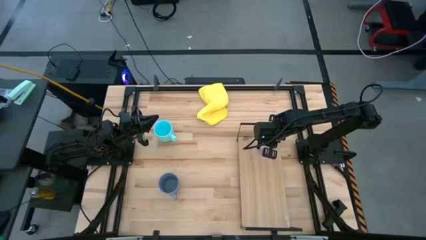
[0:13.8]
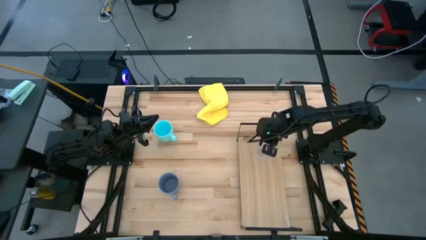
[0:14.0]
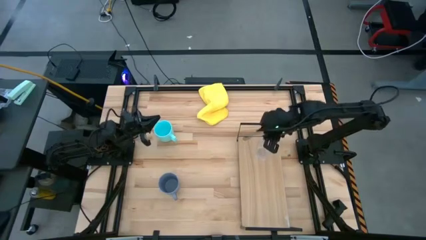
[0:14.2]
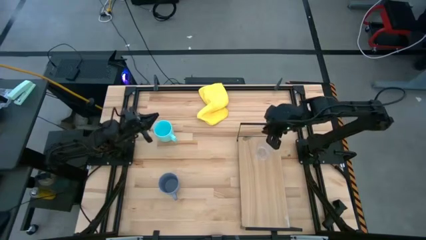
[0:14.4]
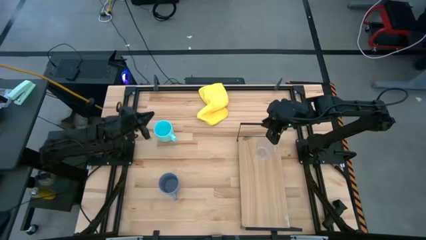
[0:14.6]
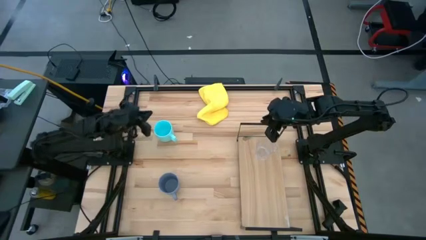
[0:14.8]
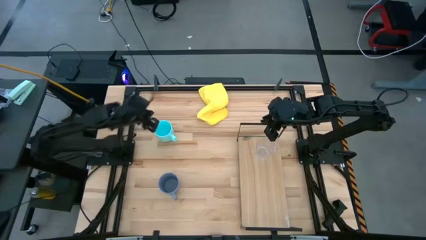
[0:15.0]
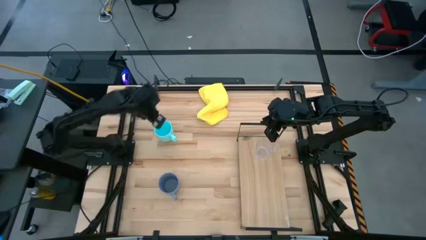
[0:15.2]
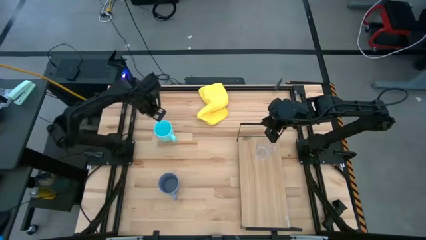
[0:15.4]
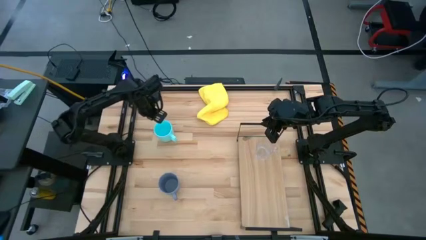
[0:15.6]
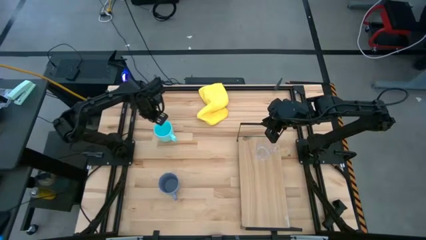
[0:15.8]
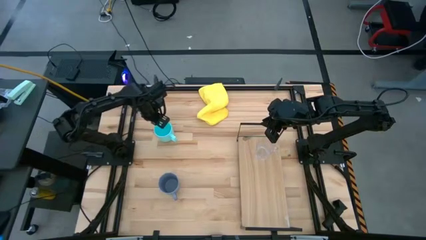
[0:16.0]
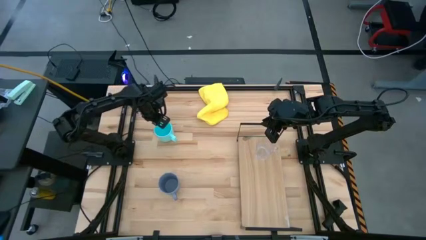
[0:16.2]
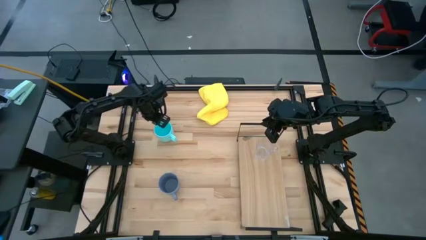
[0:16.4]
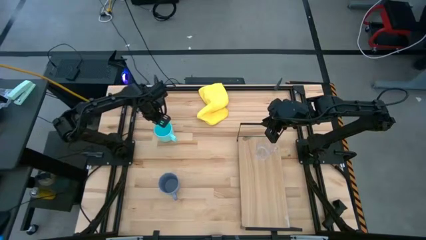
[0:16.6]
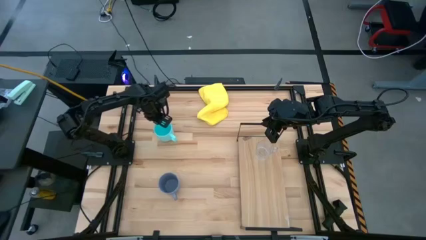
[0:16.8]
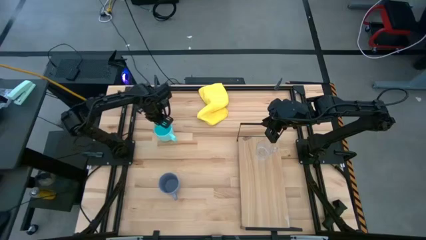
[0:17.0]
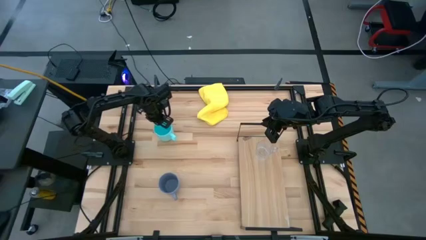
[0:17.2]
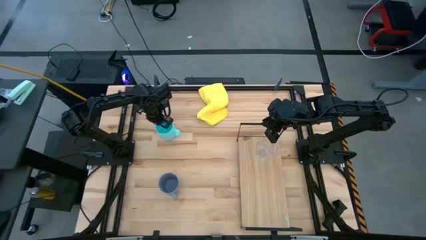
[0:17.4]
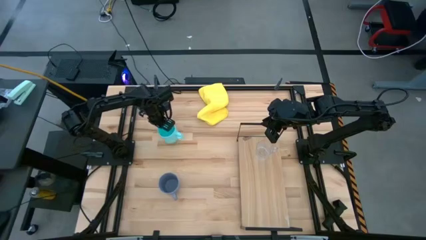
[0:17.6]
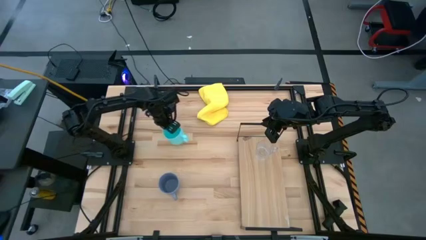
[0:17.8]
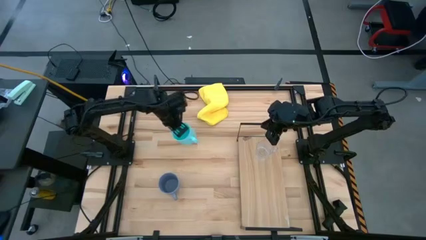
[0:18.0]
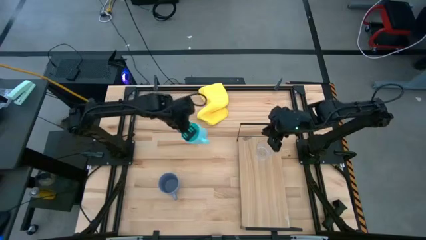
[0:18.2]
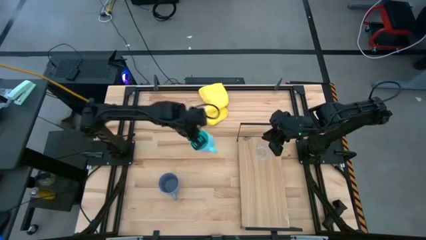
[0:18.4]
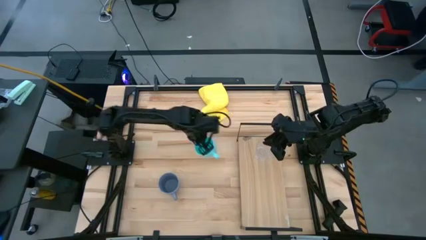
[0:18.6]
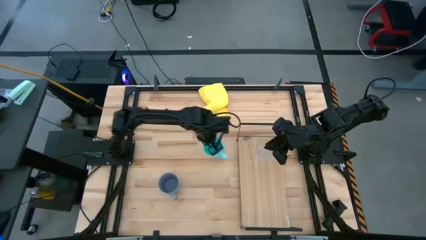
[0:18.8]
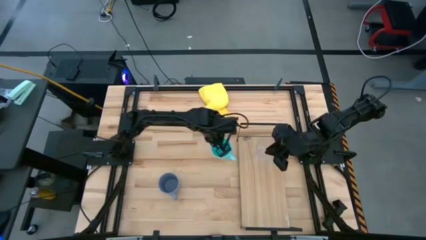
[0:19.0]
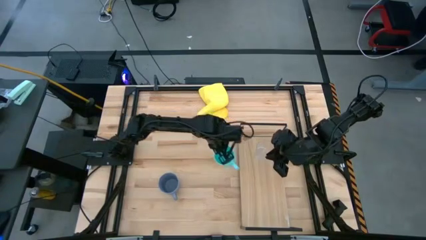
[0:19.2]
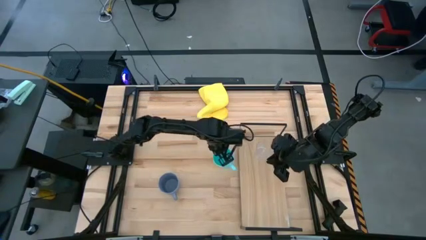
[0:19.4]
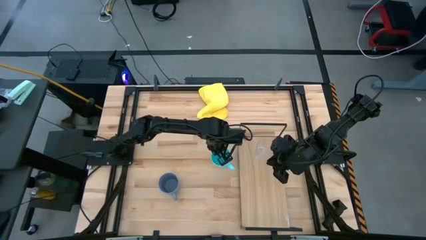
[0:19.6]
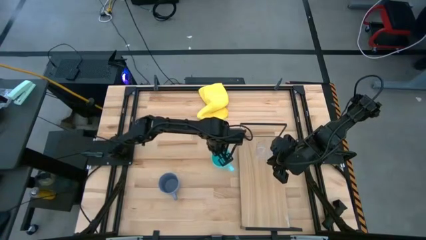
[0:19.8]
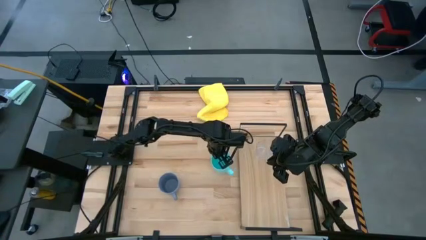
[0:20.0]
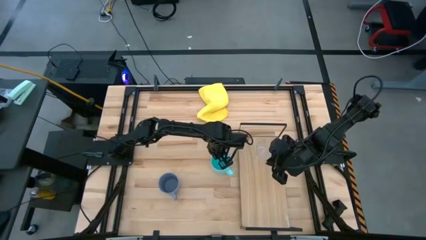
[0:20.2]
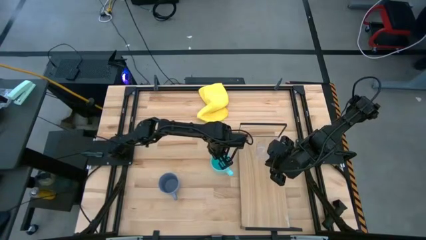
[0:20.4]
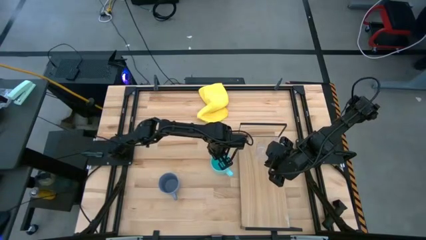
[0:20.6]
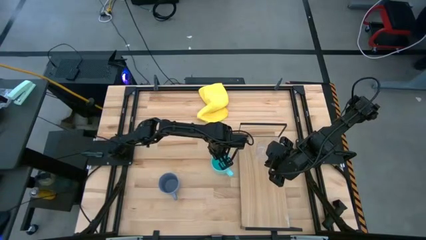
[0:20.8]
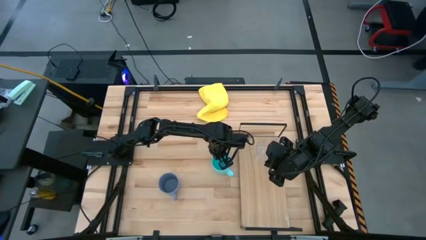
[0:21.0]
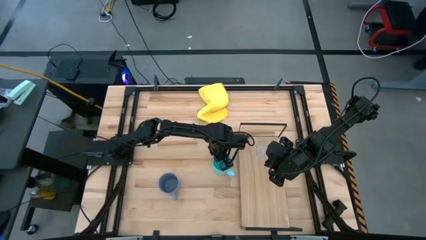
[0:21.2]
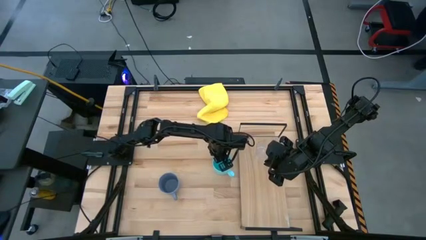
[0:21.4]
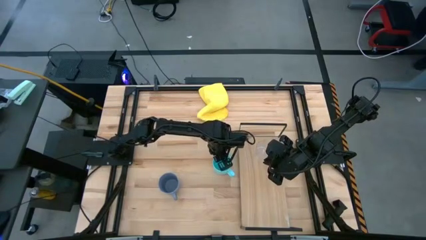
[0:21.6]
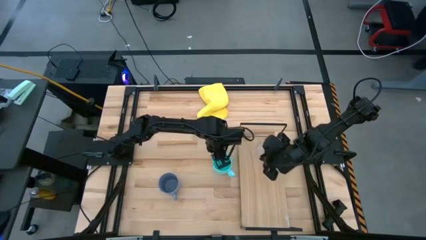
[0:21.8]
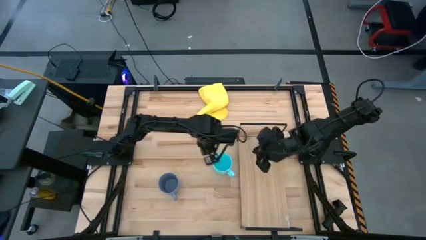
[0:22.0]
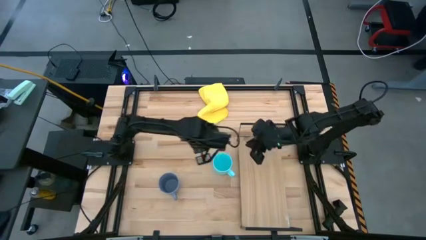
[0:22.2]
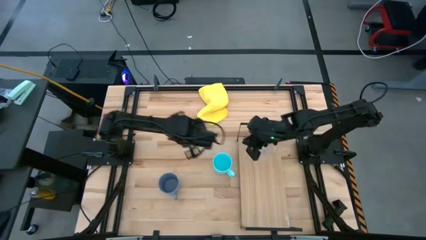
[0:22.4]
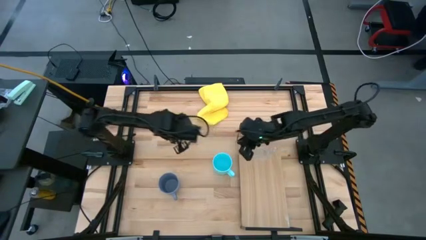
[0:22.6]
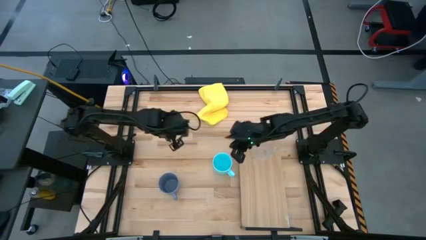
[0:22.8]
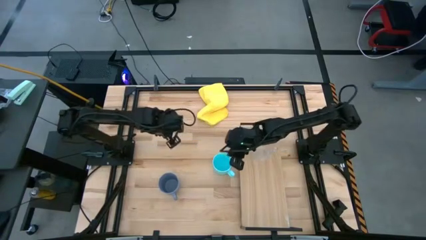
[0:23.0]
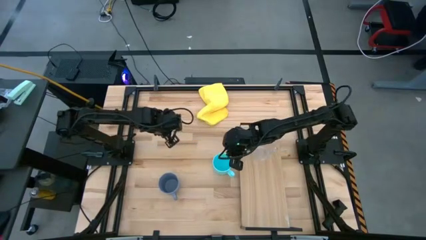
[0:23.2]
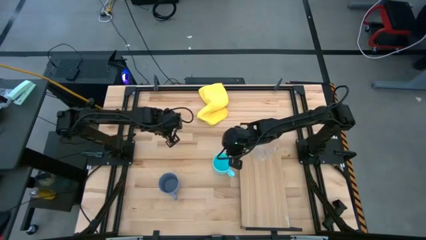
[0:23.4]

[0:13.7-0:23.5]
Task: Stack small to large cups/mugs on shelf
Put the blue mug on the shelf

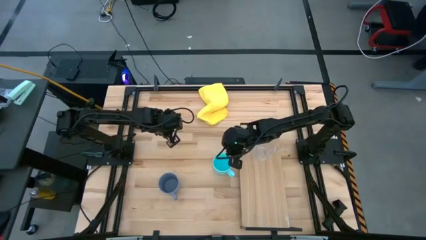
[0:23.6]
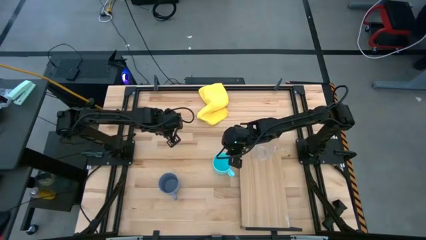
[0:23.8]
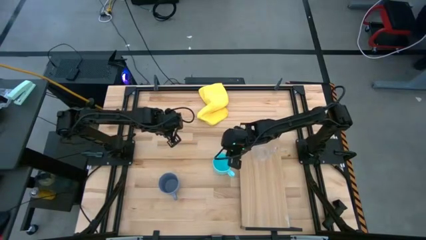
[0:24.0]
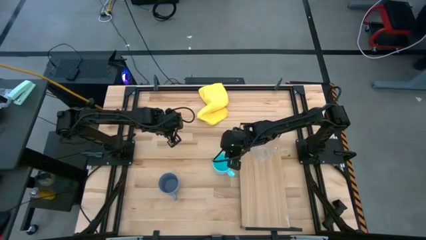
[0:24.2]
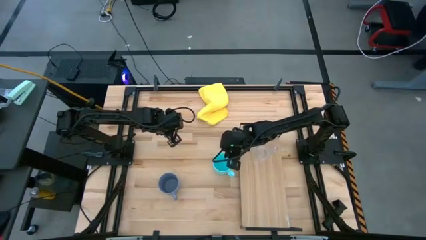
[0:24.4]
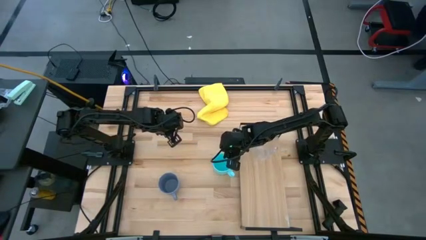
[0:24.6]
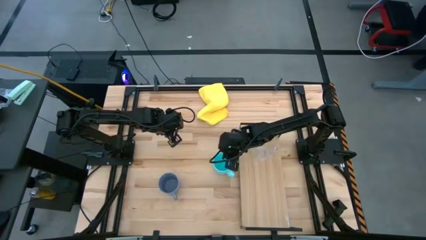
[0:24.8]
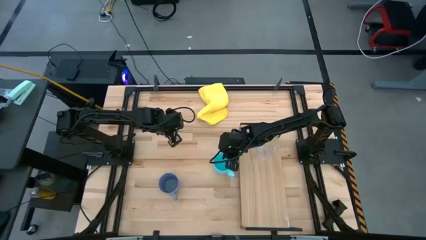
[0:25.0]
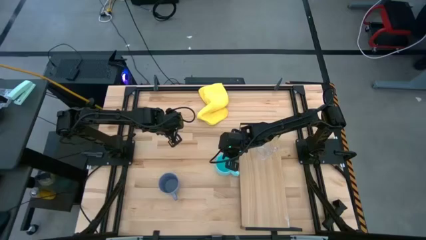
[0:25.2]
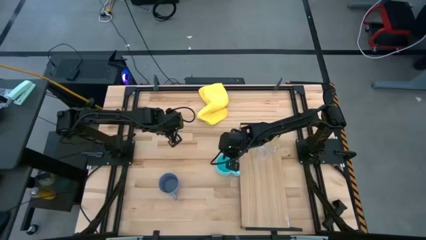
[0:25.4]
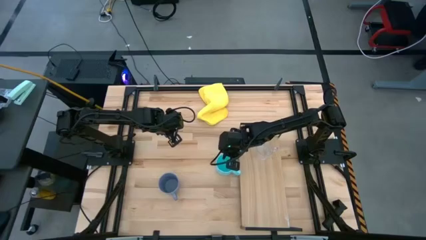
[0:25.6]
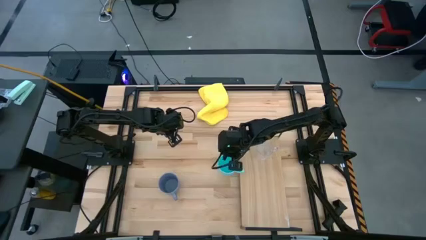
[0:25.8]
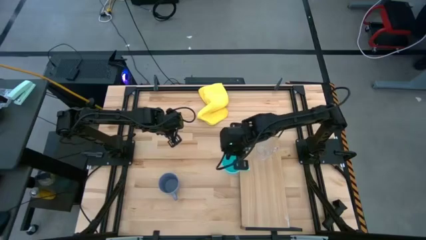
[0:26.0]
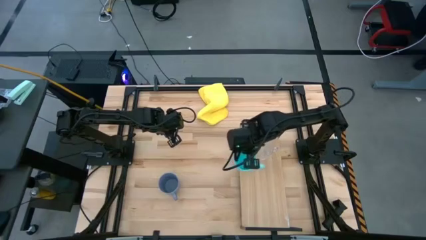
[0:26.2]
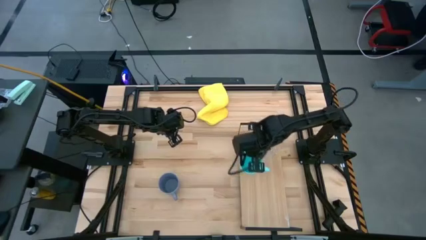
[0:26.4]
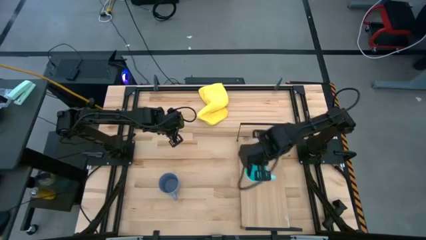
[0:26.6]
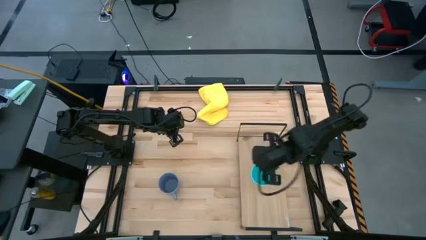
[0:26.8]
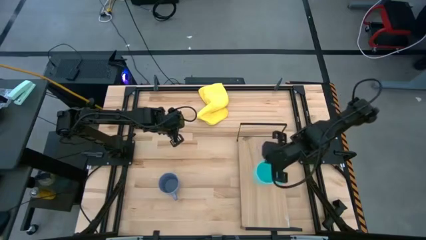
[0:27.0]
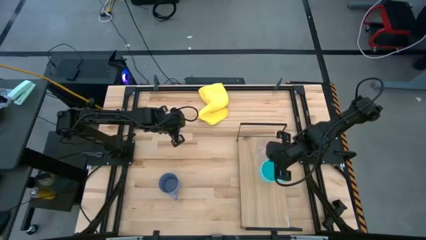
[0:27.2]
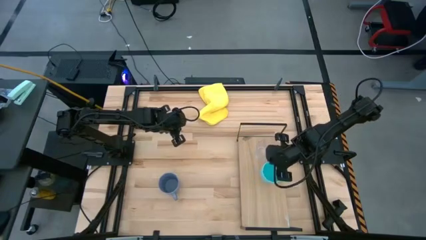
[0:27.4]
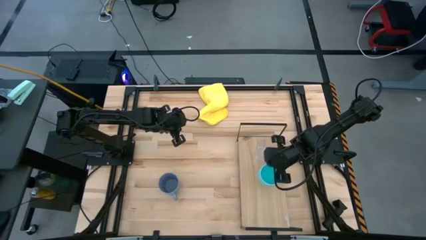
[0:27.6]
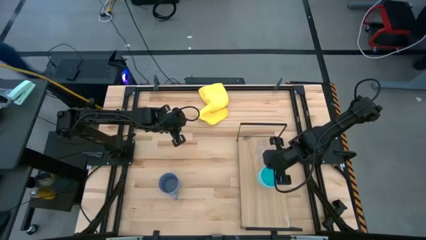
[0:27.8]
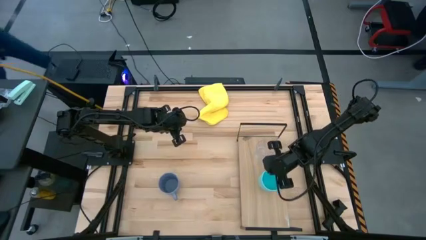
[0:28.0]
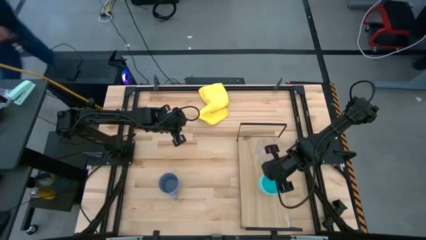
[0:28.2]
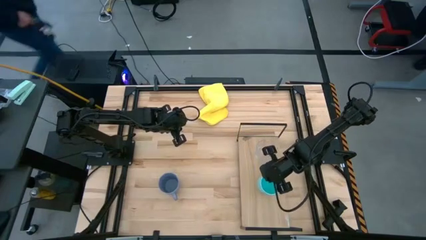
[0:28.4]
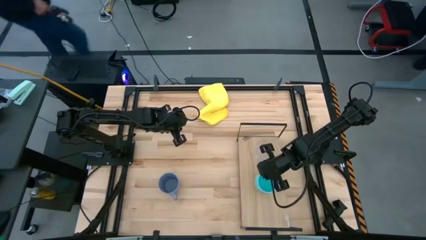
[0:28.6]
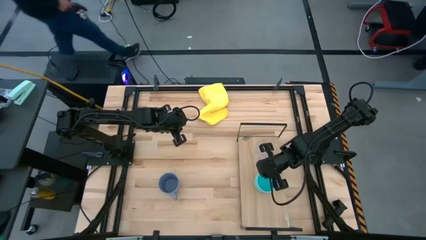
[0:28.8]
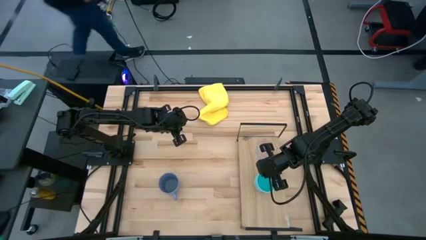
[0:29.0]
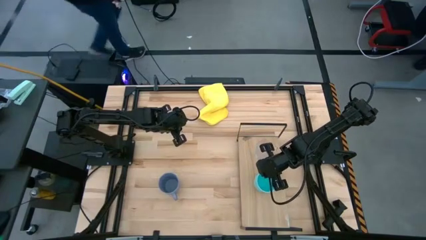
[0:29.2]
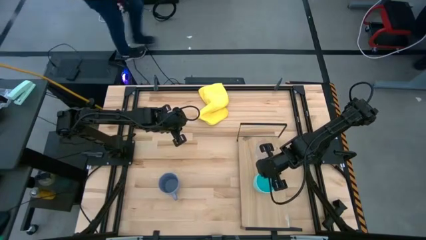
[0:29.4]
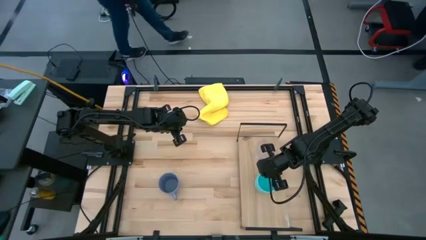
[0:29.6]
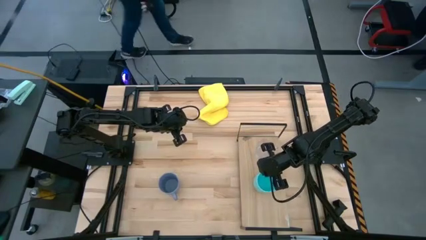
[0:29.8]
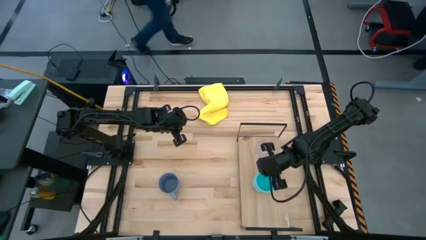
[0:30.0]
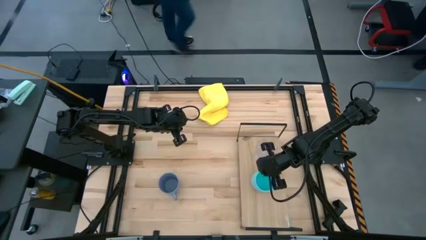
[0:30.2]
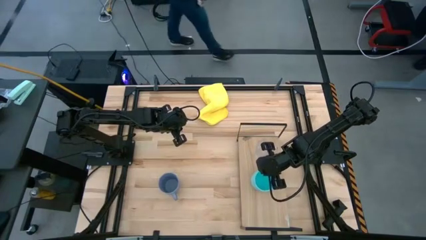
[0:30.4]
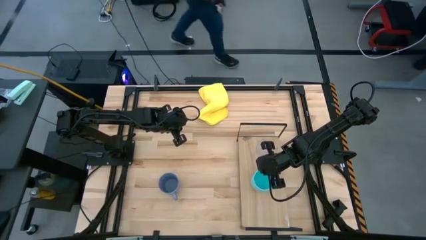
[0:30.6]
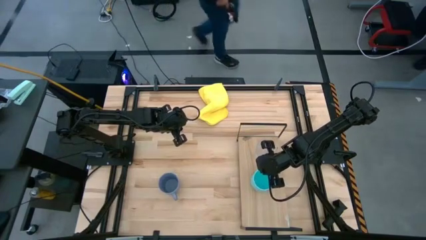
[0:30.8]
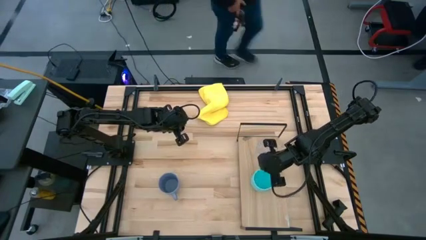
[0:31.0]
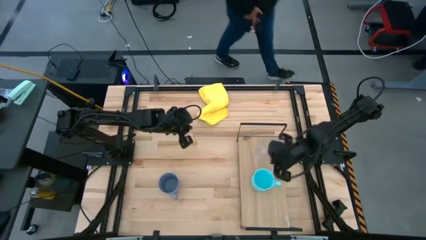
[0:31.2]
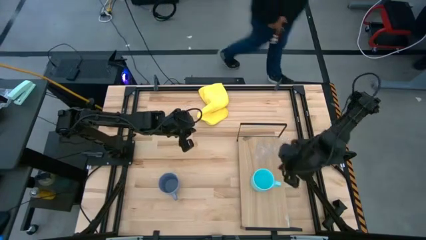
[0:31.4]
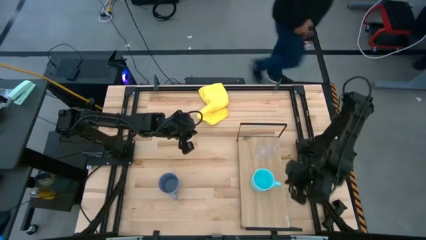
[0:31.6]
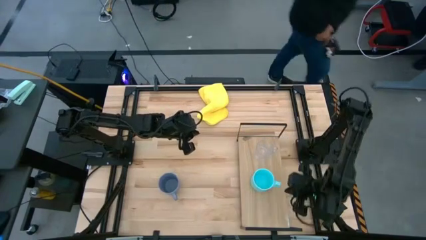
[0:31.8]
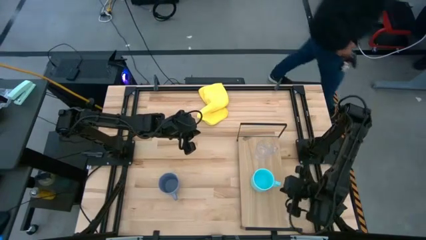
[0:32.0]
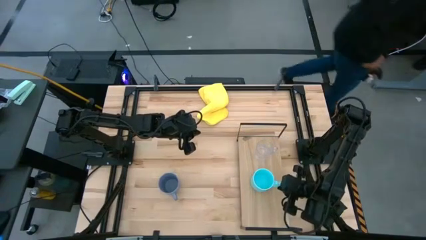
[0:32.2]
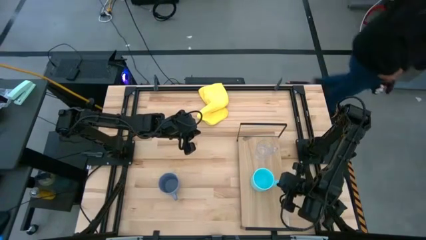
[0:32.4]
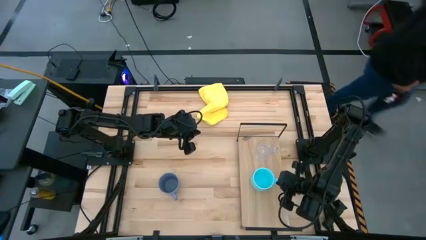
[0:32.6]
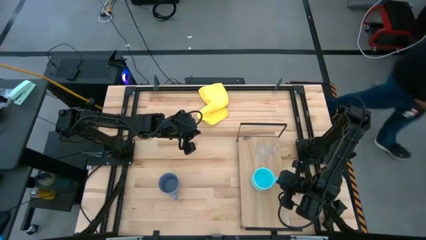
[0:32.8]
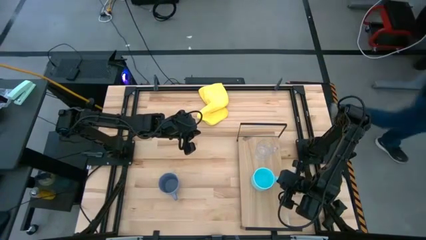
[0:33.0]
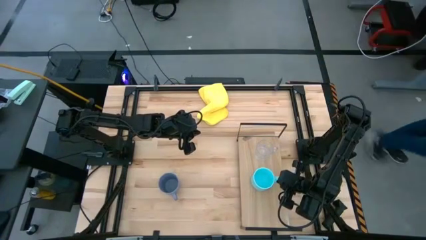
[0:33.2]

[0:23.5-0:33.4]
Put the blue mug on the shelf
